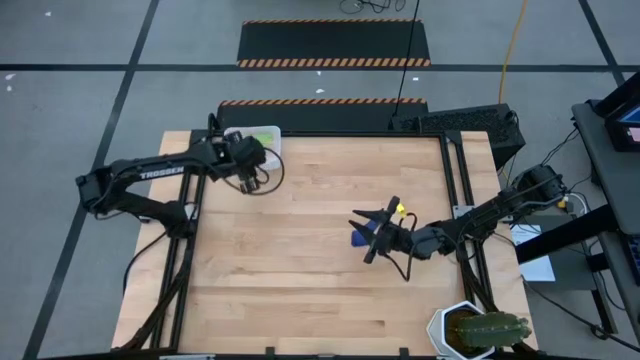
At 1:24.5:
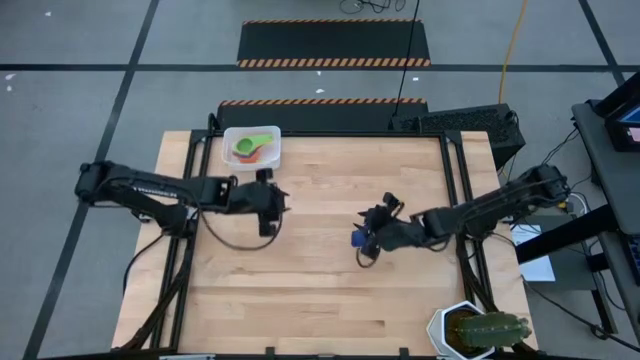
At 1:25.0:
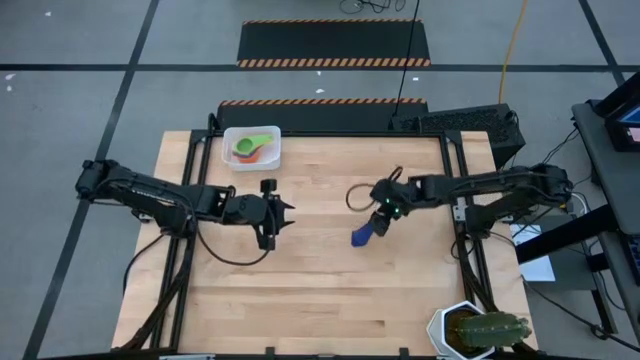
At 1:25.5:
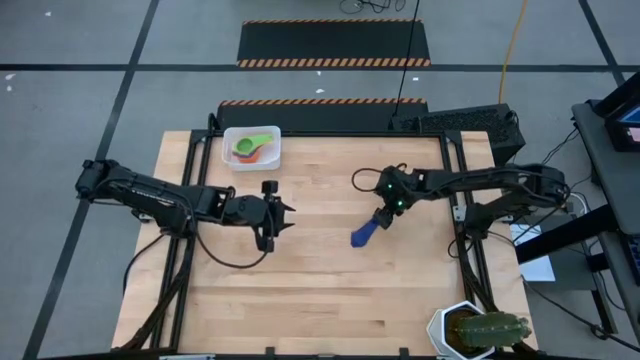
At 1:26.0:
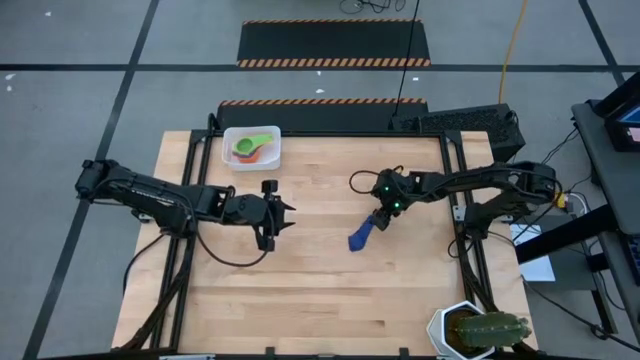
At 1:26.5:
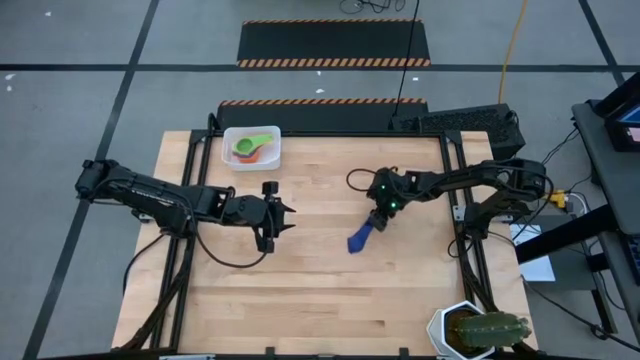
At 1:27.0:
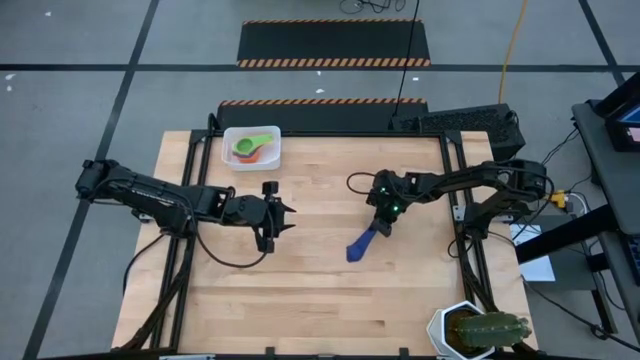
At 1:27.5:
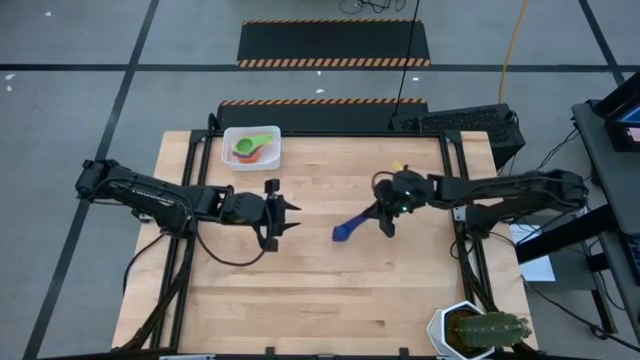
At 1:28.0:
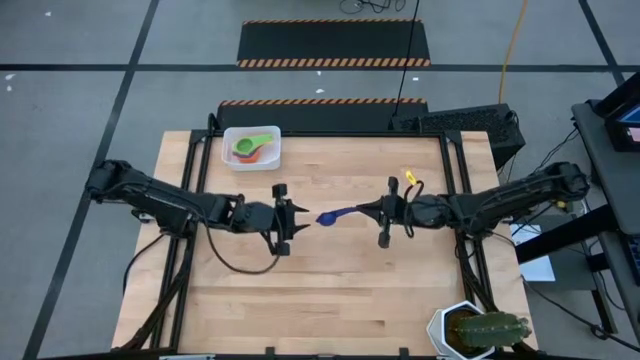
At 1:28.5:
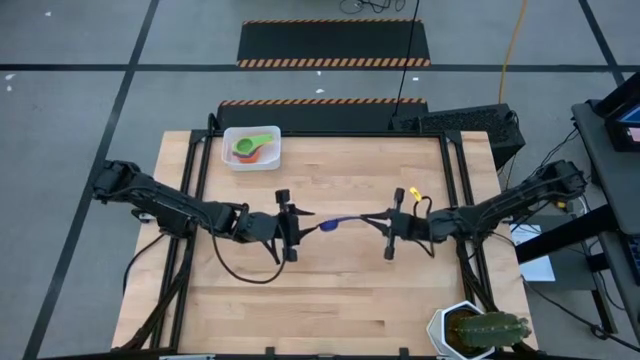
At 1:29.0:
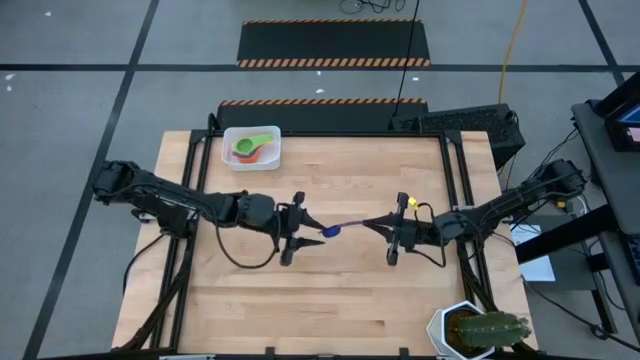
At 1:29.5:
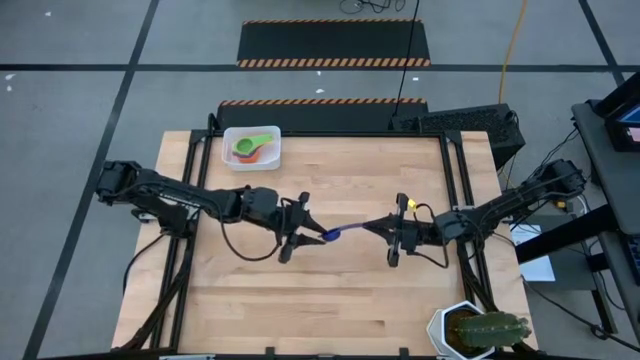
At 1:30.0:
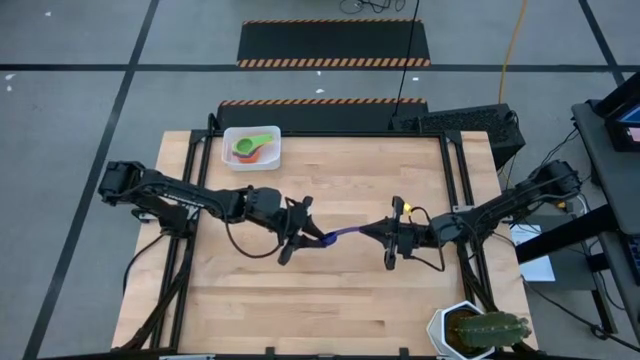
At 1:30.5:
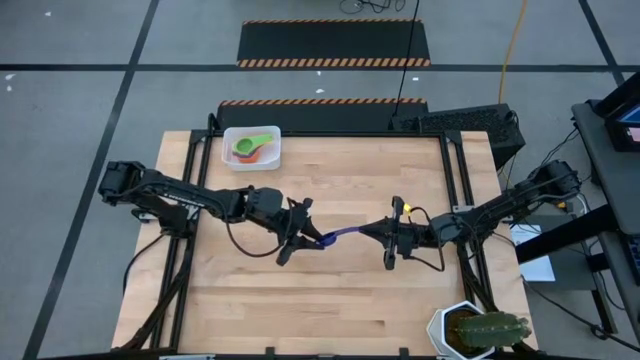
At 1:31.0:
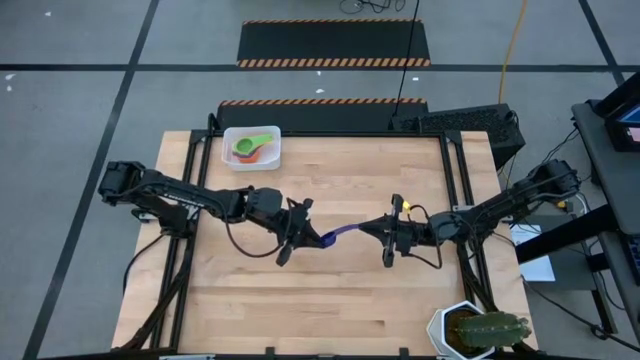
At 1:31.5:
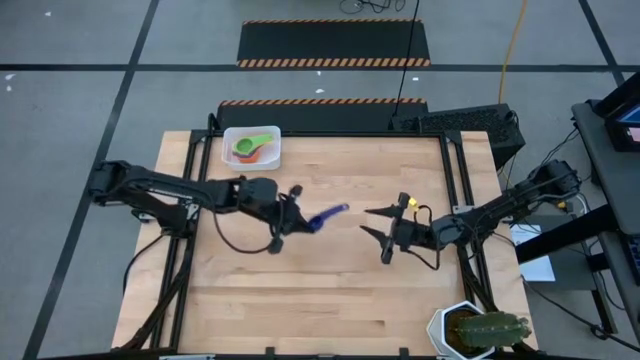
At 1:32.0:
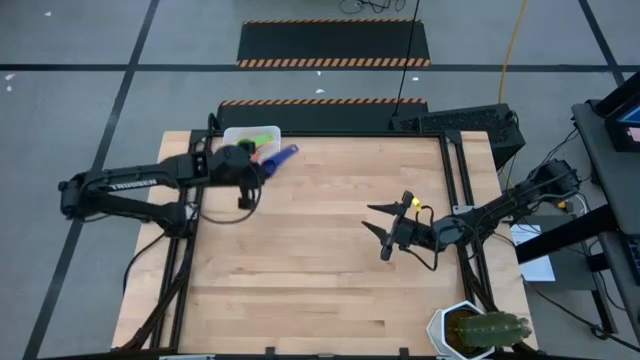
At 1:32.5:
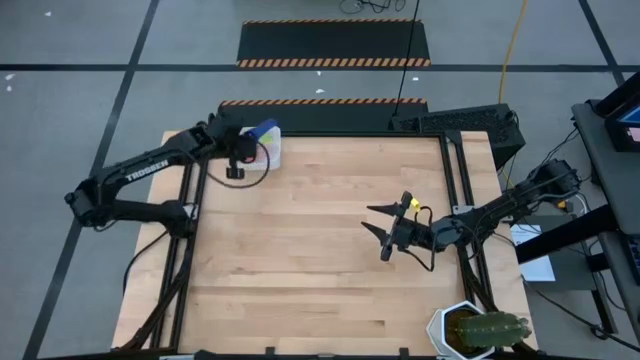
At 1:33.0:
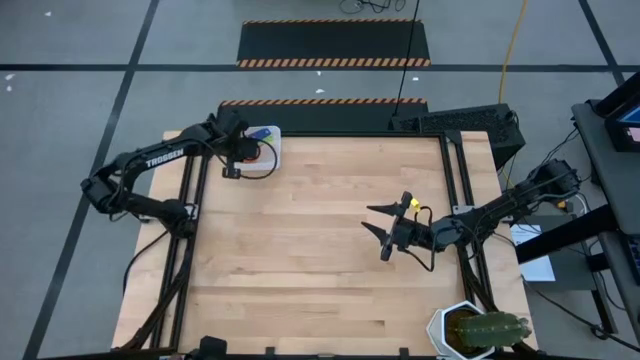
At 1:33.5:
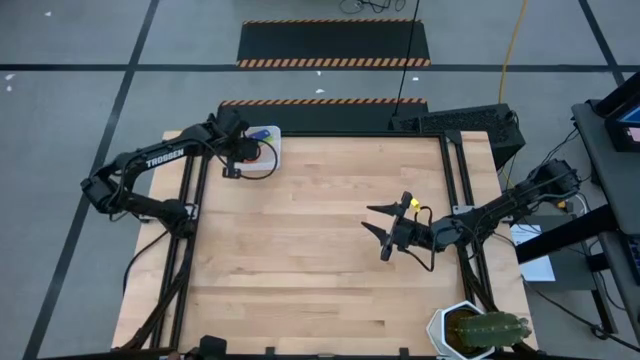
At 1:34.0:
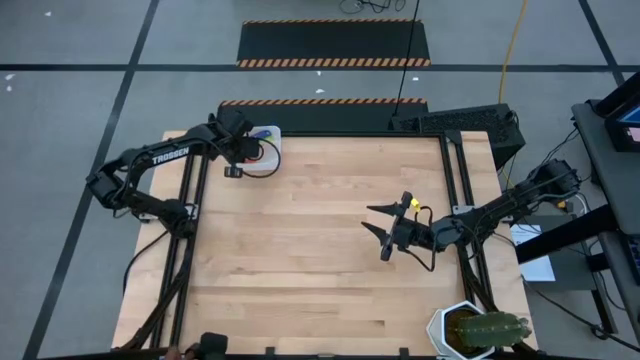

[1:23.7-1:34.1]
Task: Nest measuring cups in basket
Stack the violet measuring cup into the green measuring cup

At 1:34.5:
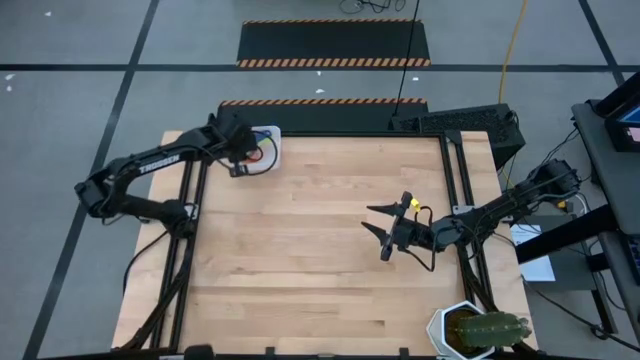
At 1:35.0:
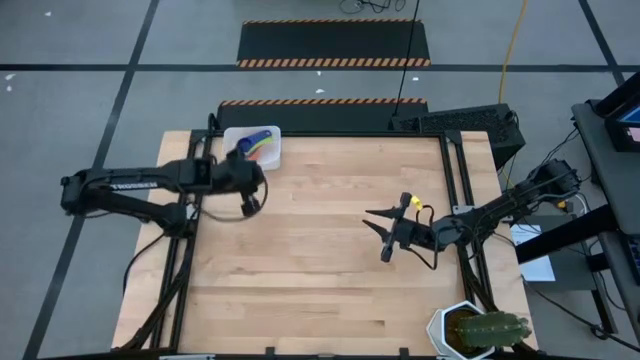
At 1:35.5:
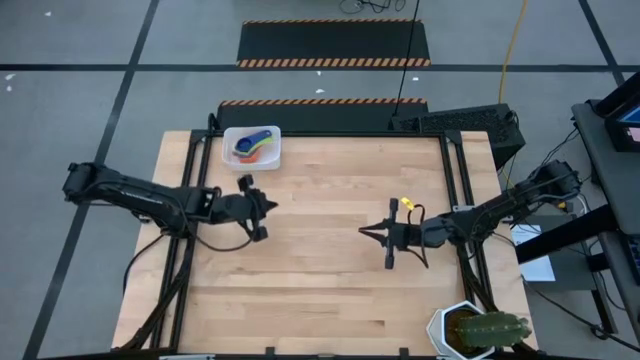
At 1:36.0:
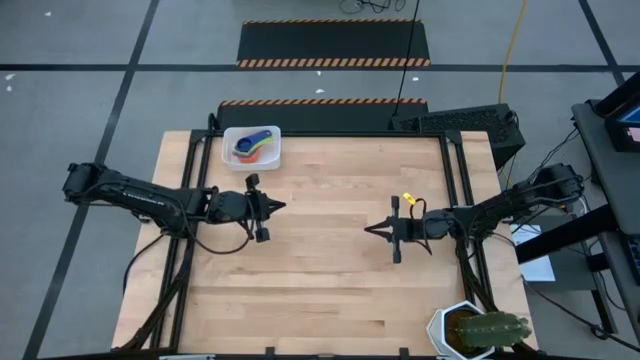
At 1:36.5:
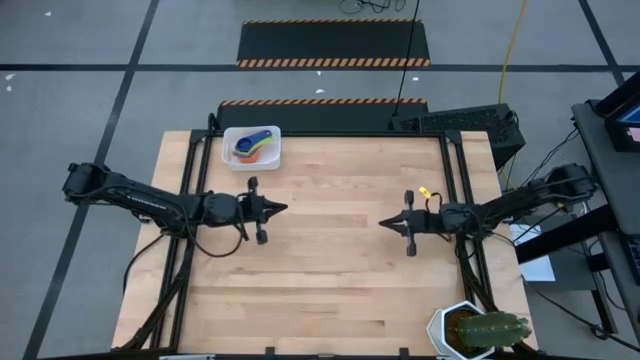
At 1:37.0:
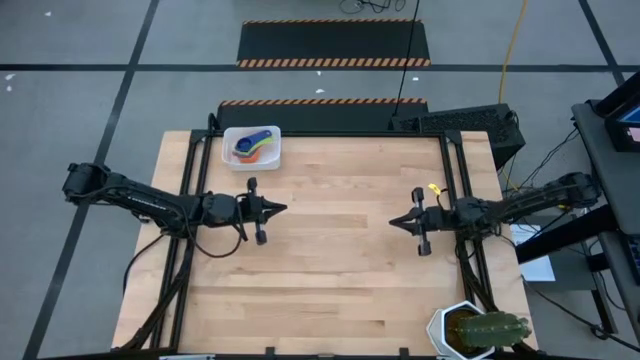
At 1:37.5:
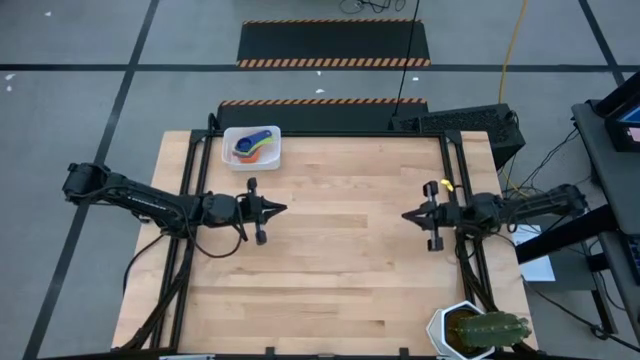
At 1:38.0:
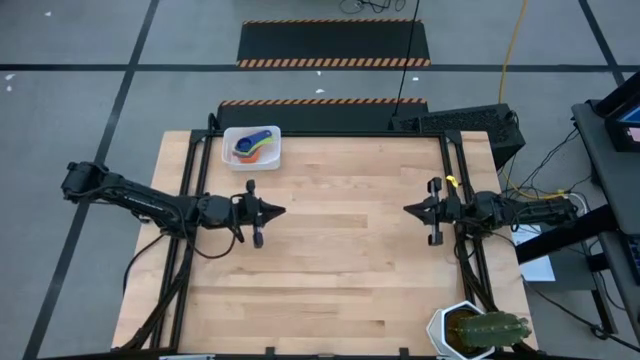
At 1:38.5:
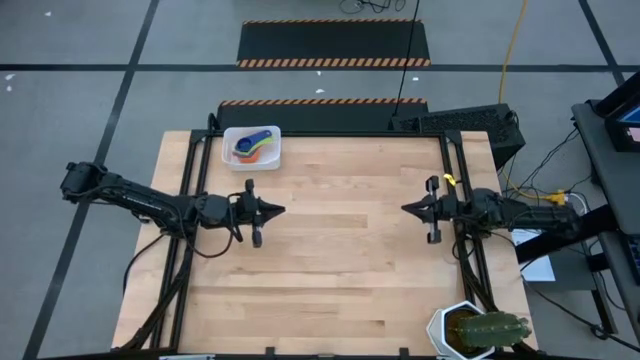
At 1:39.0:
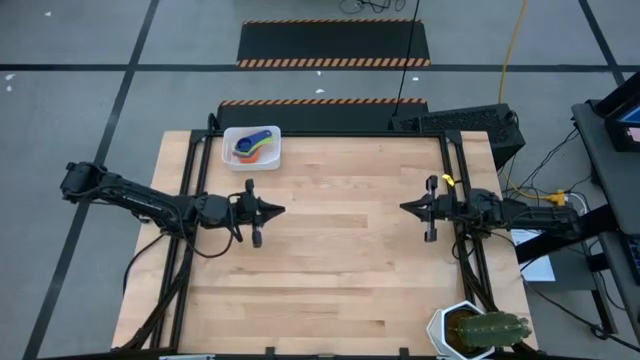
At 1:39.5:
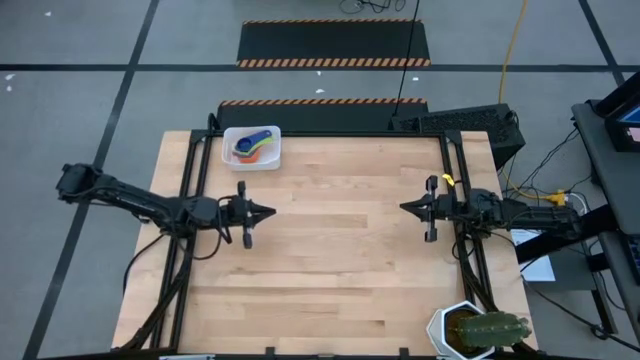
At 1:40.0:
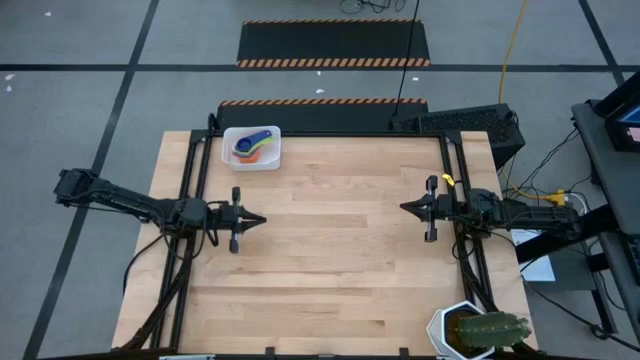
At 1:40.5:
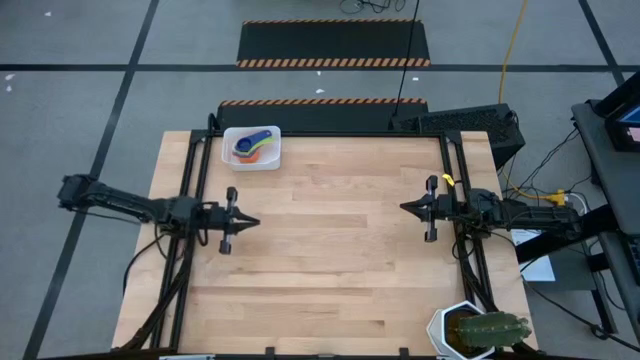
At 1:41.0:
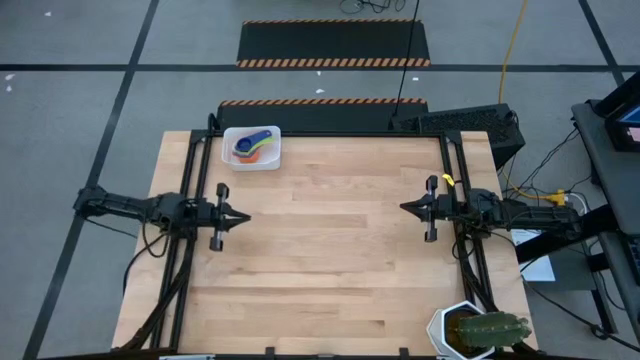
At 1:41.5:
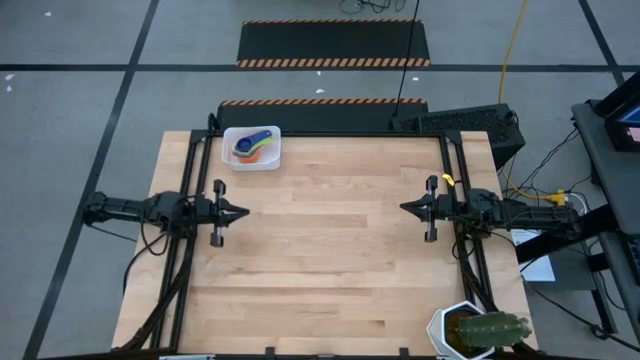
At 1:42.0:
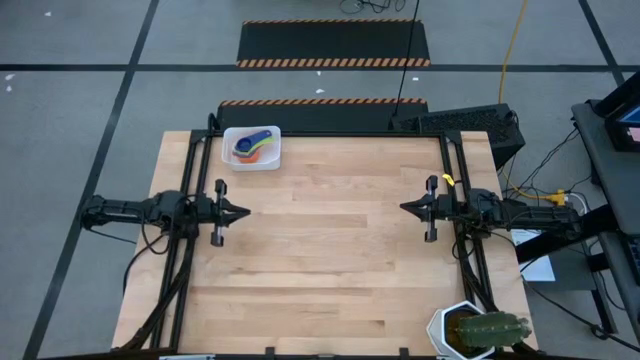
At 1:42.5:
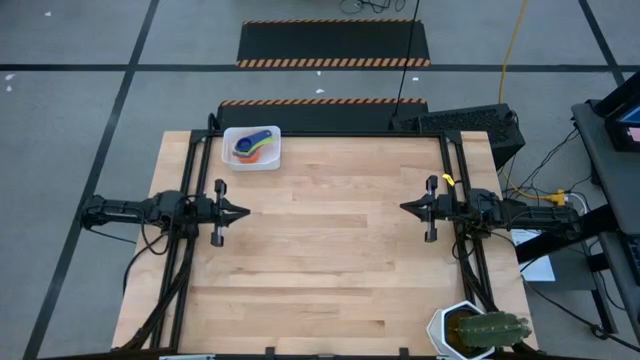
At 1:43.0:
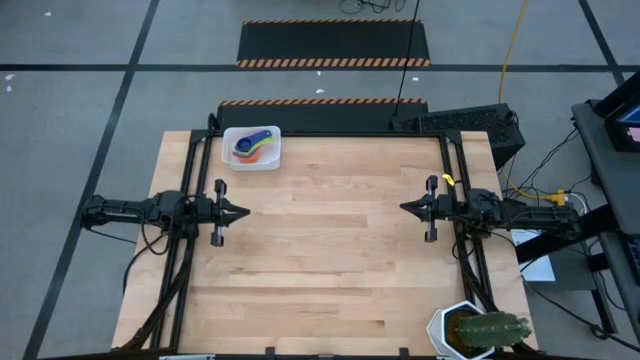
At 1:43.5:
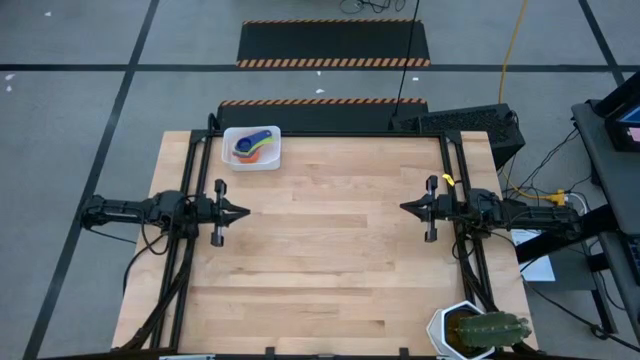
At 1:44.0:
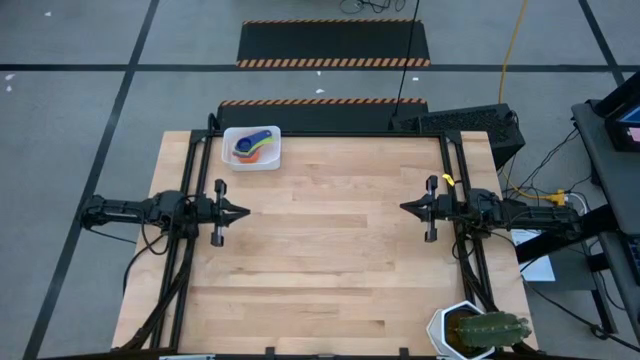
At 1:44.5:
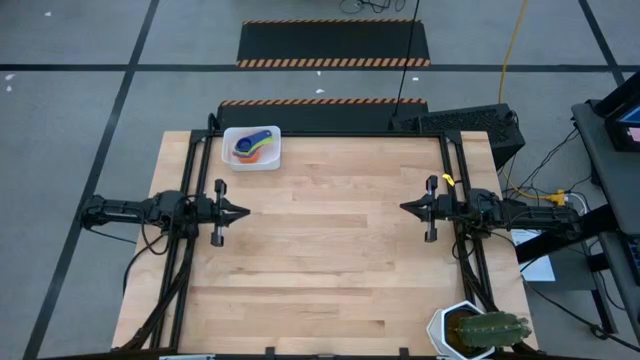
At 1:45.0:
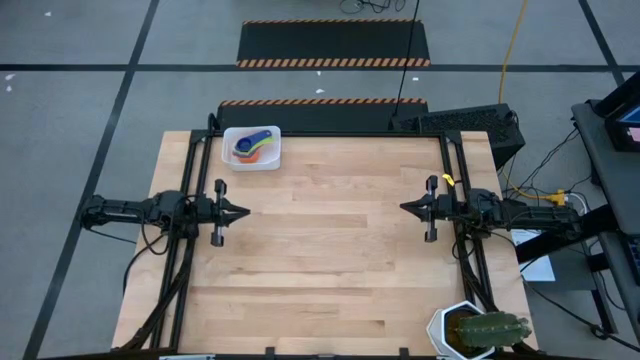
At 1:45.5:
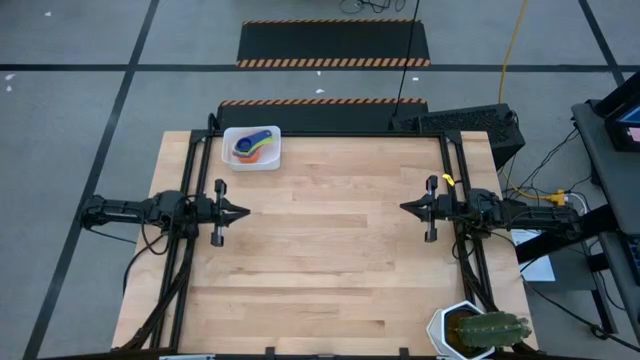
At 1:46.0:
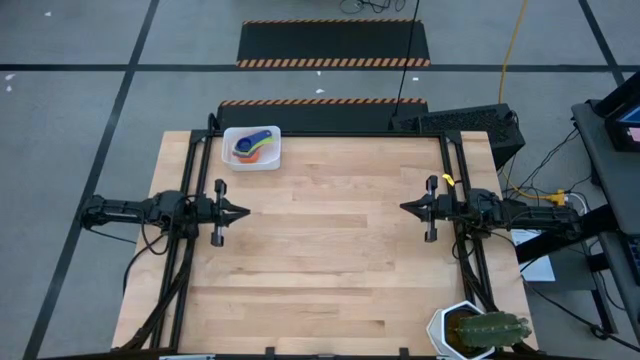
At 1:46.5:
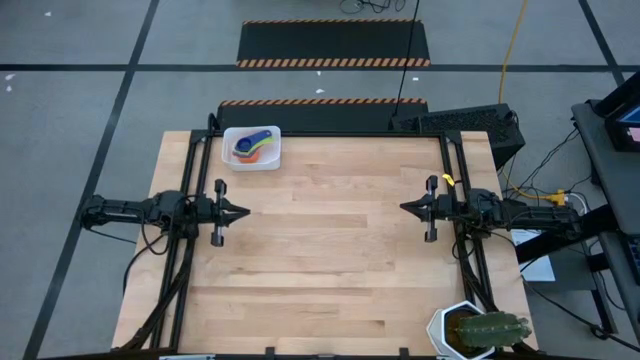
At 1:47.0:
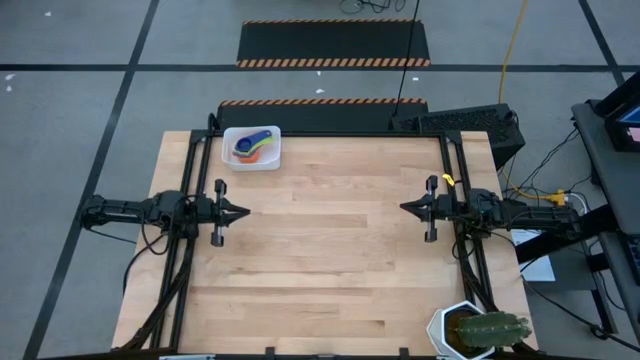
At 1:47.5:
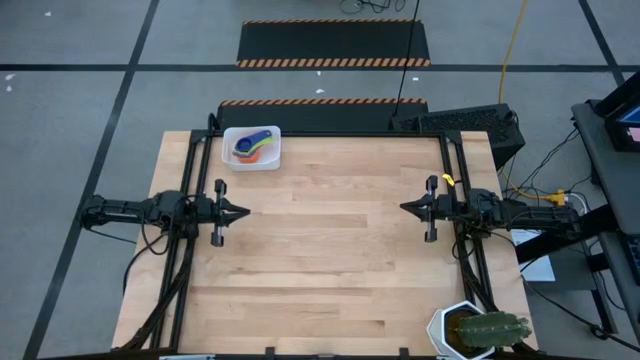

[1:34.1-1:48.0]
Return to Home Position
